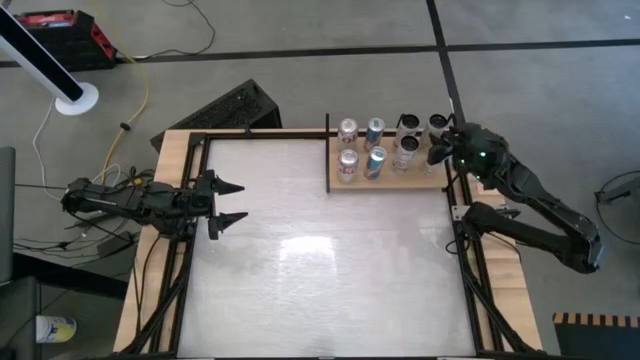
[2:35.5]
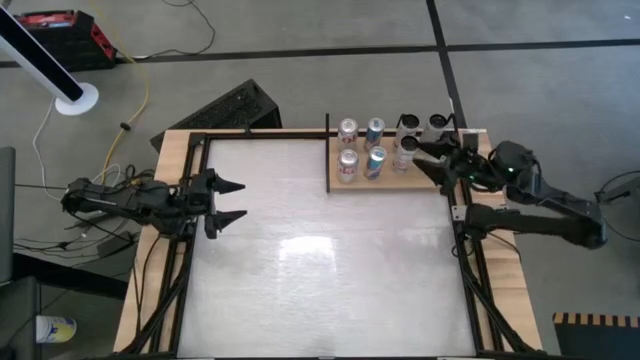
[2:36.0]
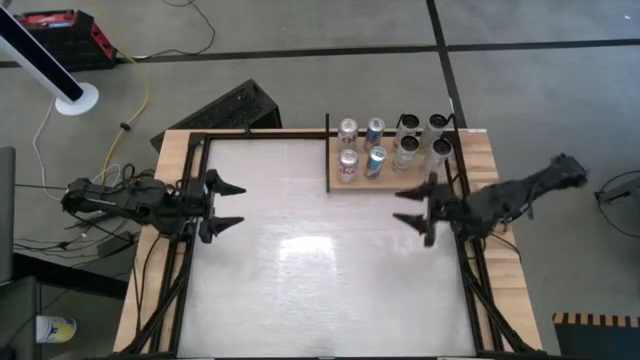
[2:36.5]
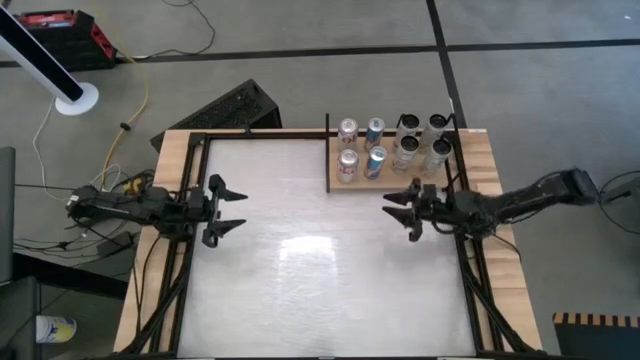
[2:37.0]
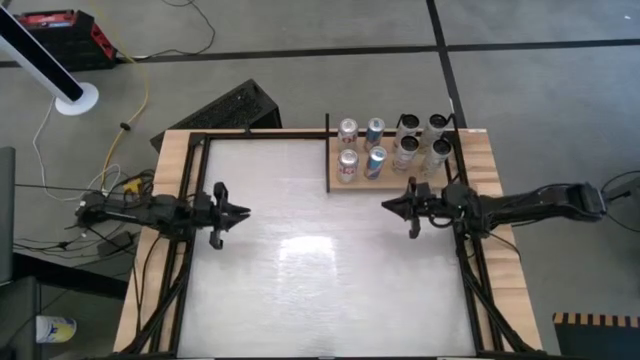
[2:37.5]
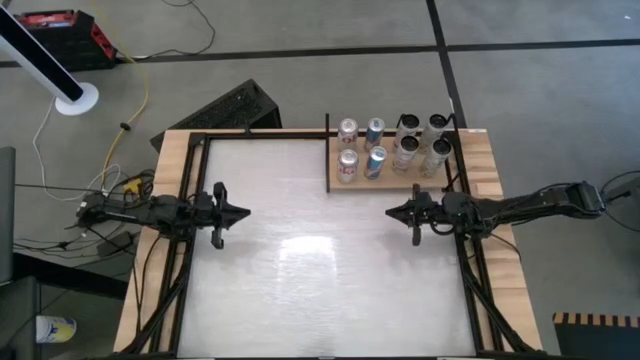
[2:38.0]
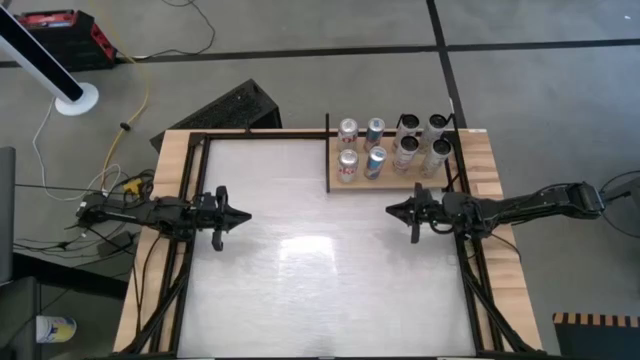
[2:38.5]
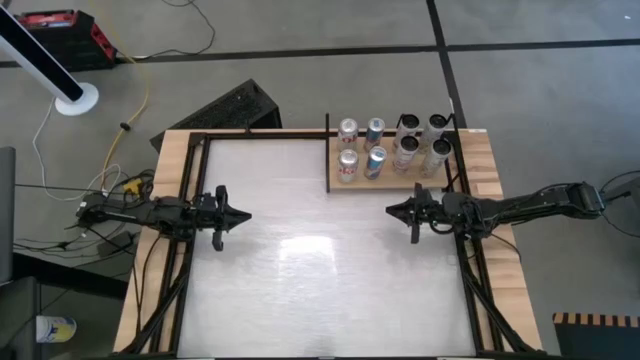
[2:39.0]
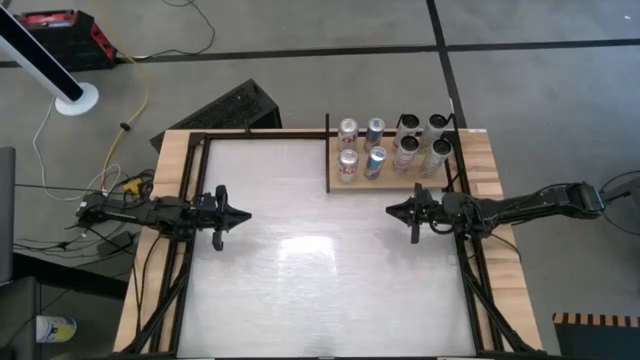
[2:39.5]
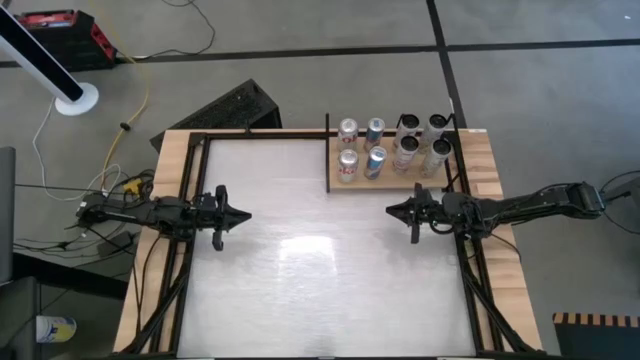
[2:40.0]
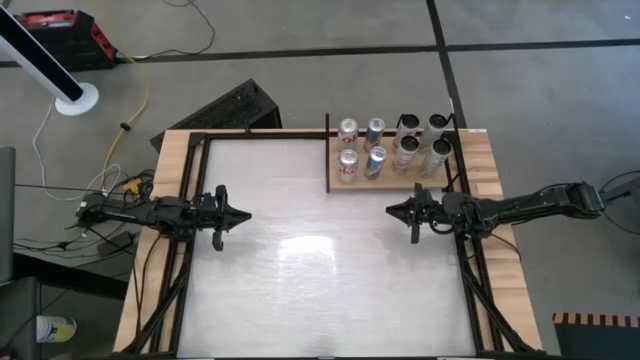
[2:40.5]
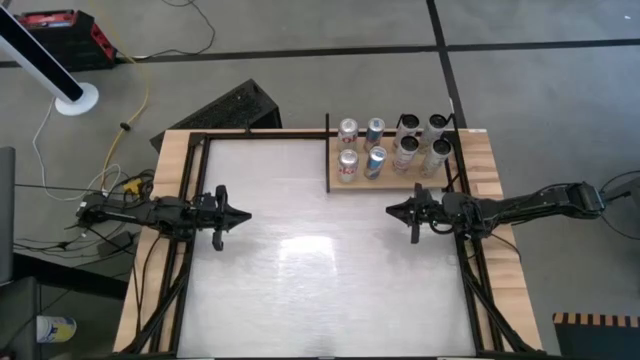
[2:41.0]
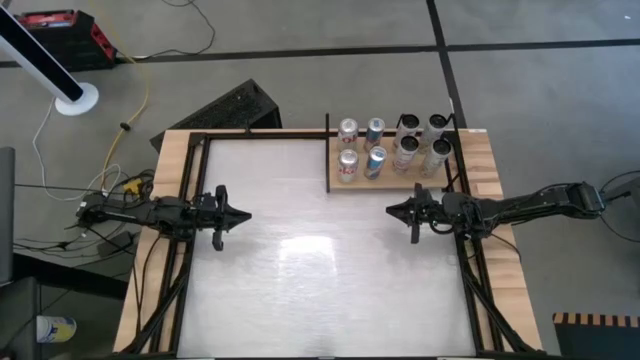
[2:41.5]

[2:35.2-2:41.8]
Task: Place canned beverage on shelf
Return to Home Position

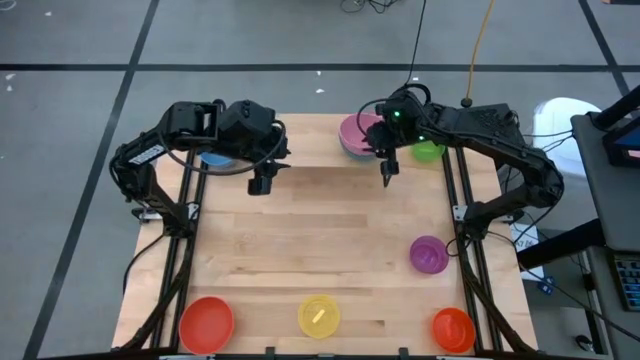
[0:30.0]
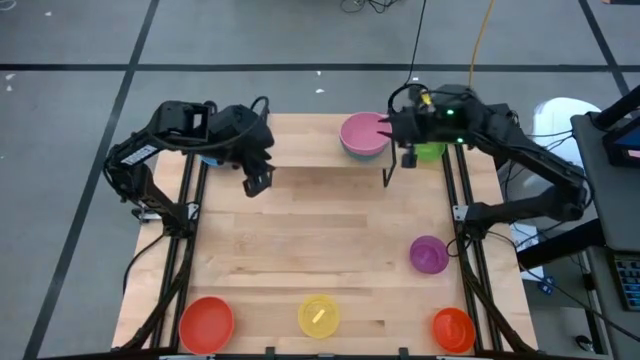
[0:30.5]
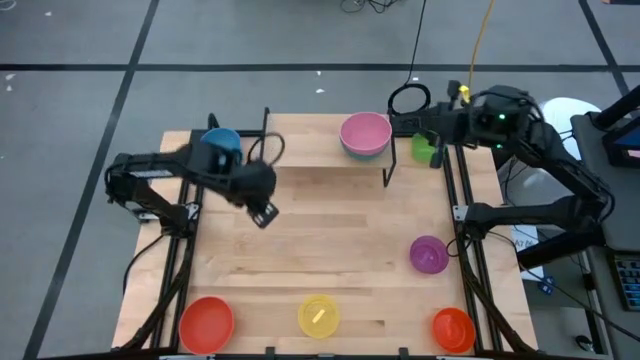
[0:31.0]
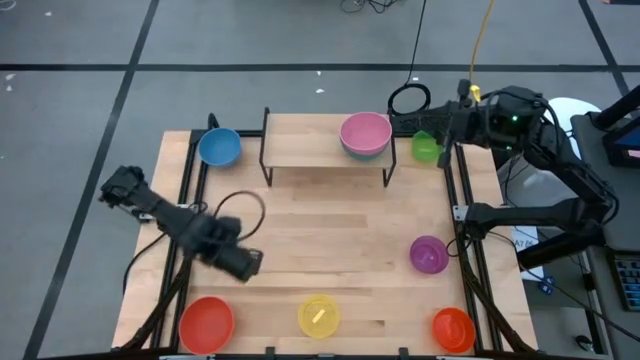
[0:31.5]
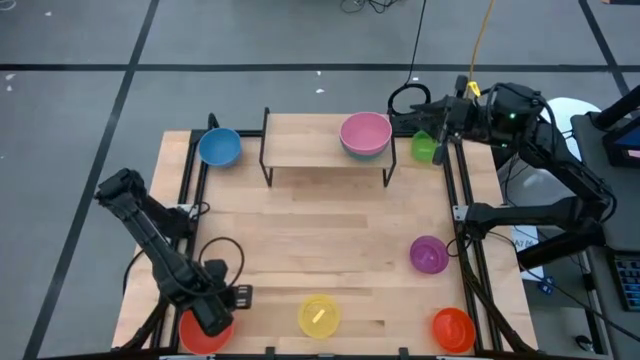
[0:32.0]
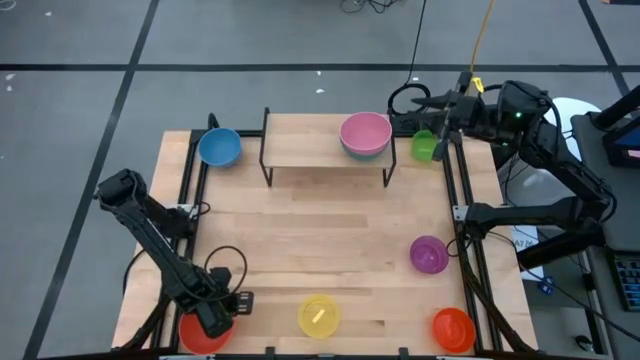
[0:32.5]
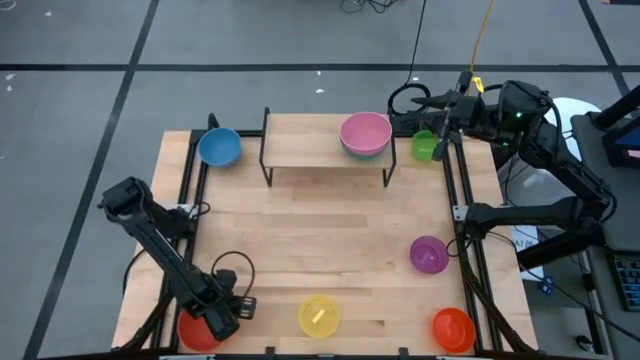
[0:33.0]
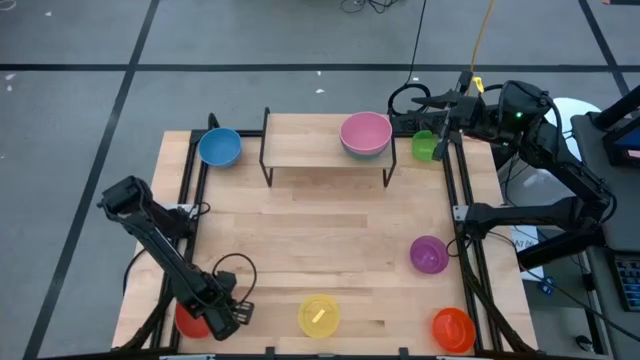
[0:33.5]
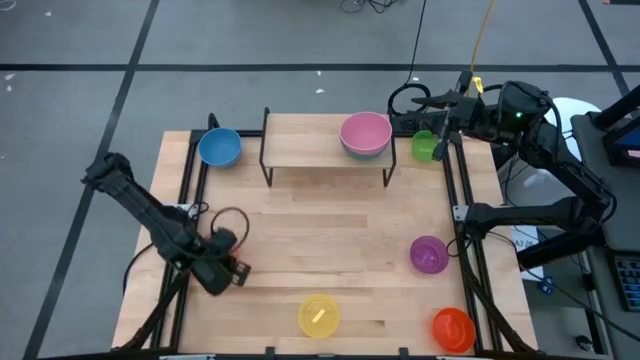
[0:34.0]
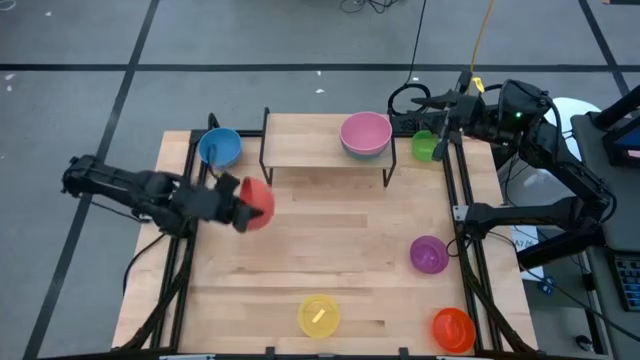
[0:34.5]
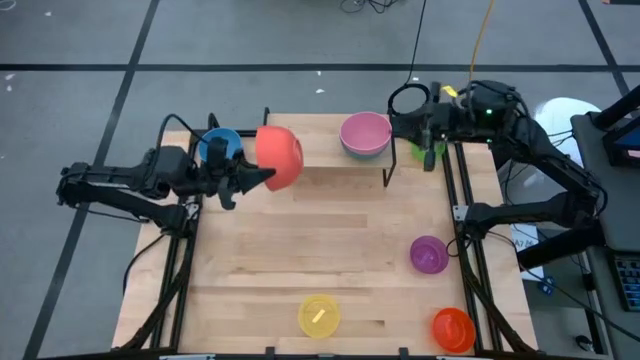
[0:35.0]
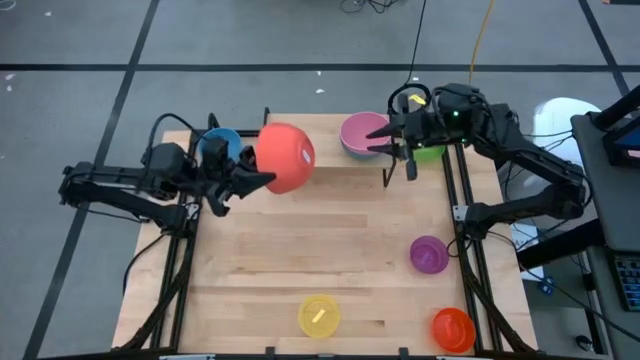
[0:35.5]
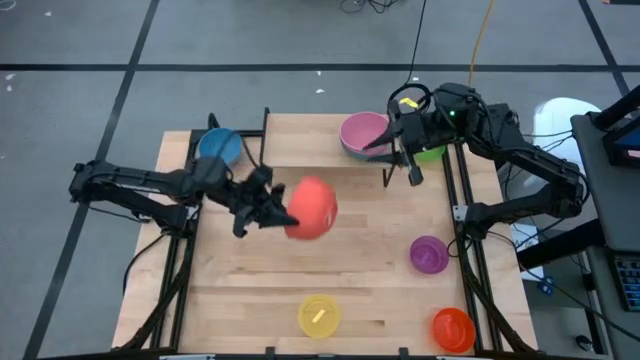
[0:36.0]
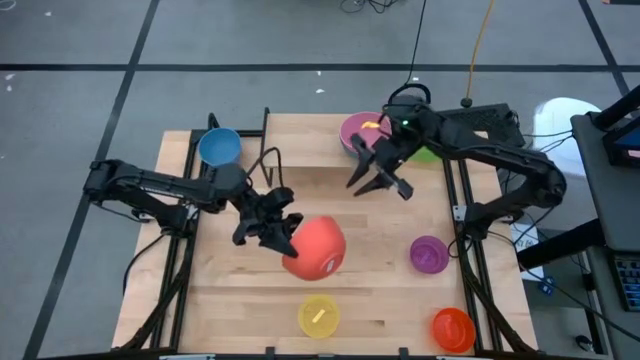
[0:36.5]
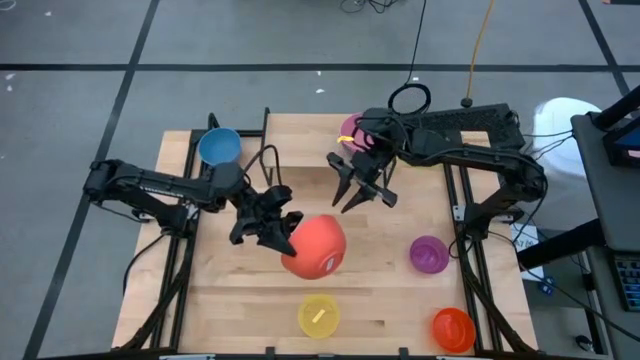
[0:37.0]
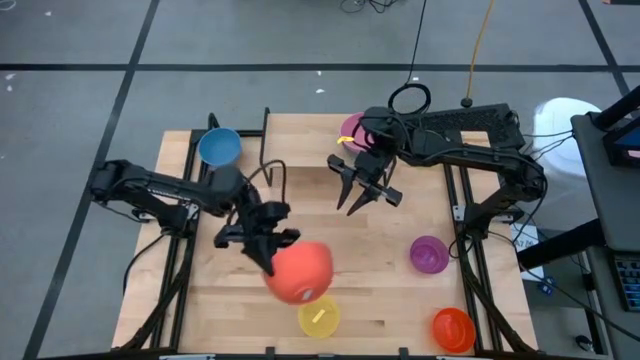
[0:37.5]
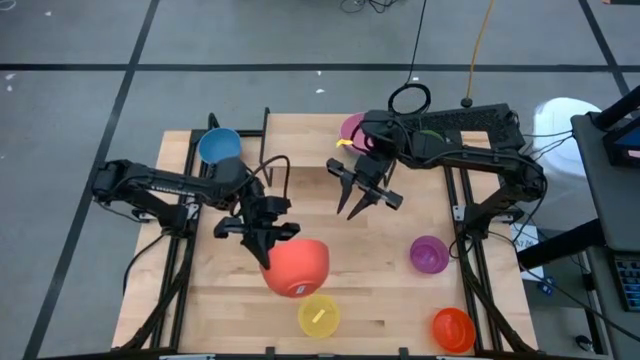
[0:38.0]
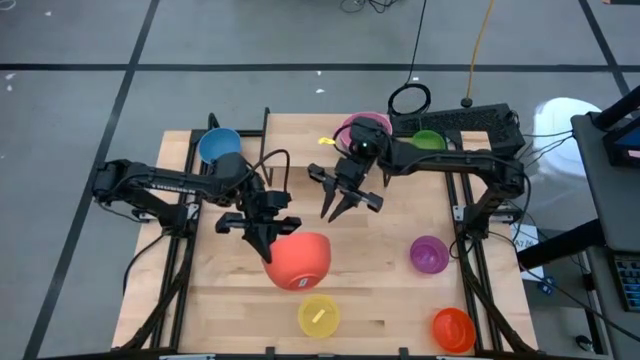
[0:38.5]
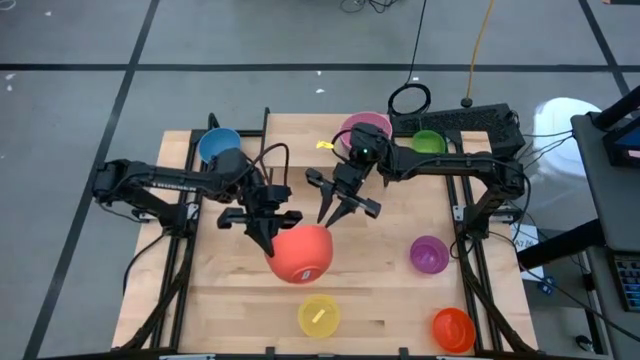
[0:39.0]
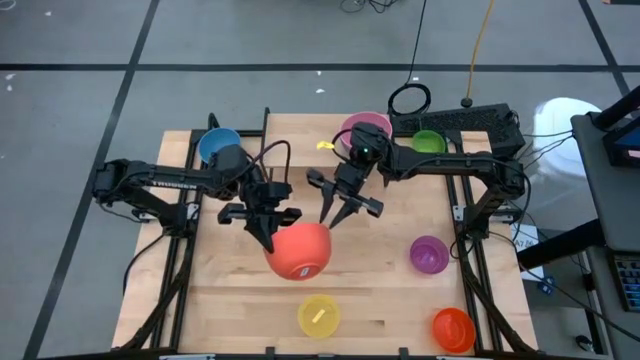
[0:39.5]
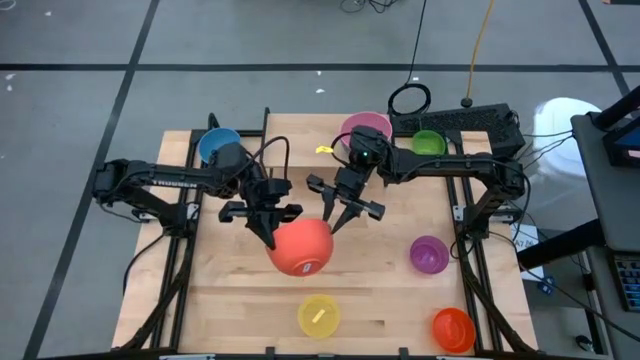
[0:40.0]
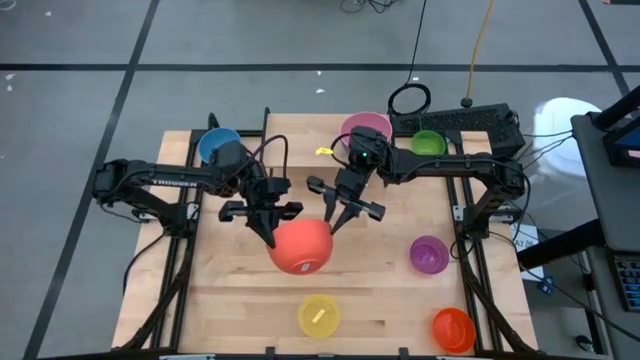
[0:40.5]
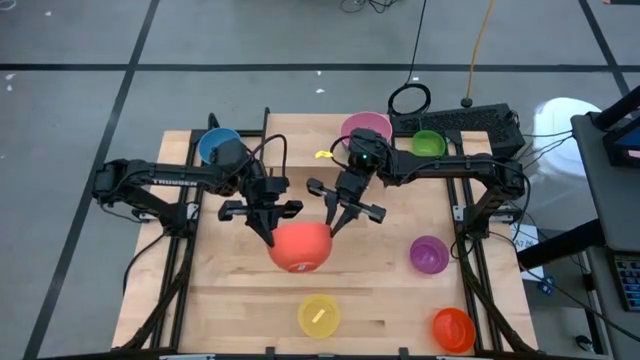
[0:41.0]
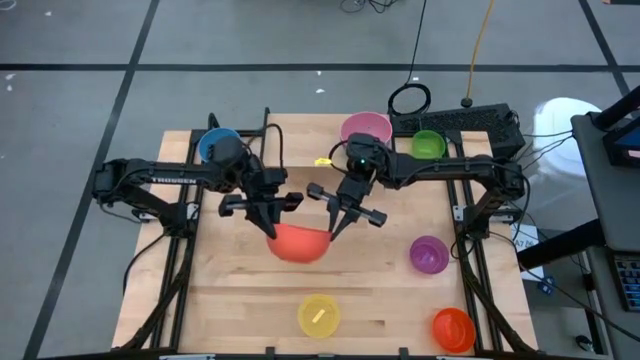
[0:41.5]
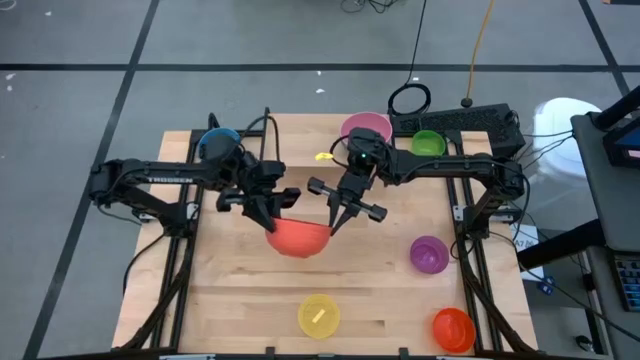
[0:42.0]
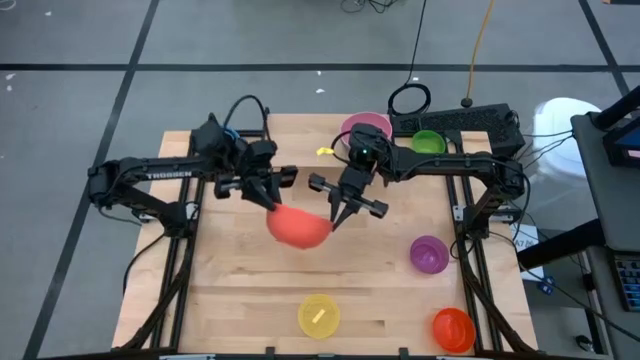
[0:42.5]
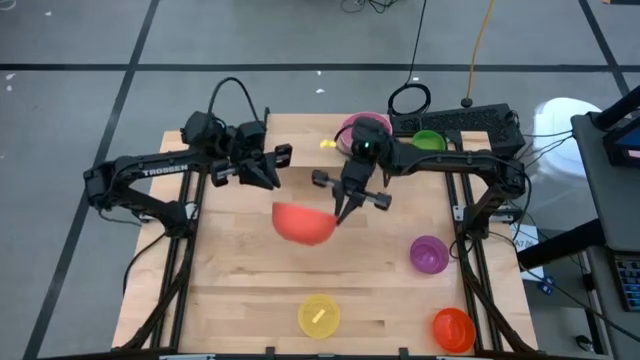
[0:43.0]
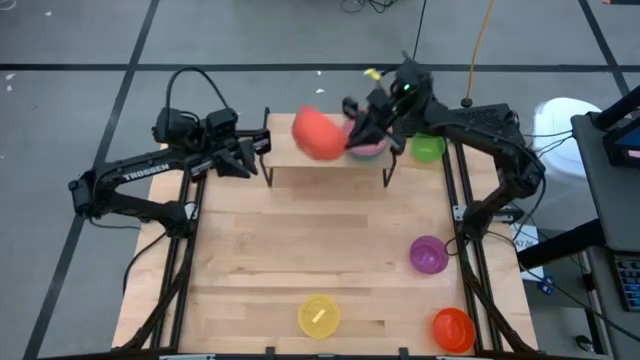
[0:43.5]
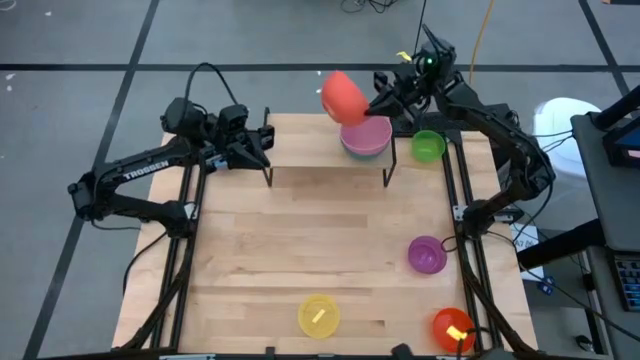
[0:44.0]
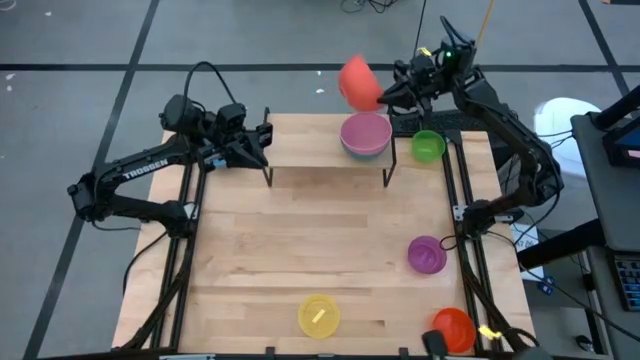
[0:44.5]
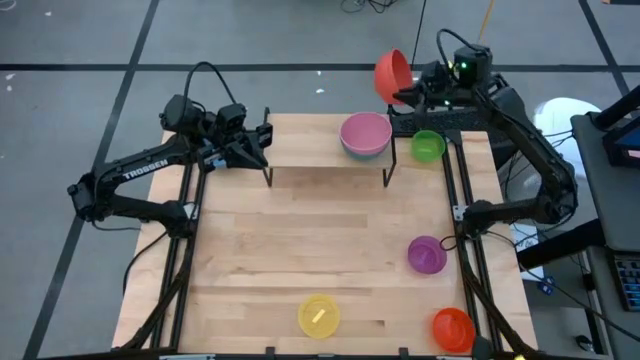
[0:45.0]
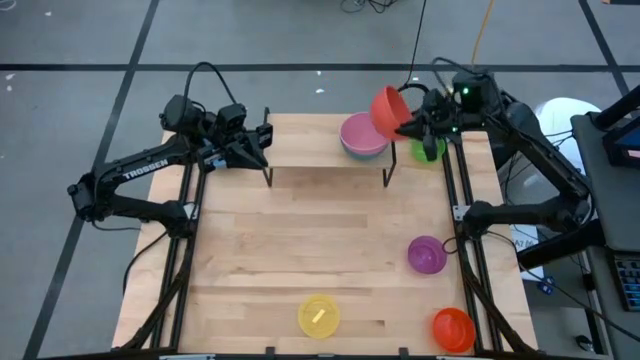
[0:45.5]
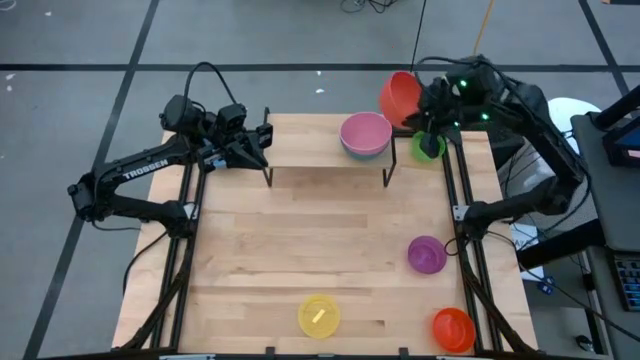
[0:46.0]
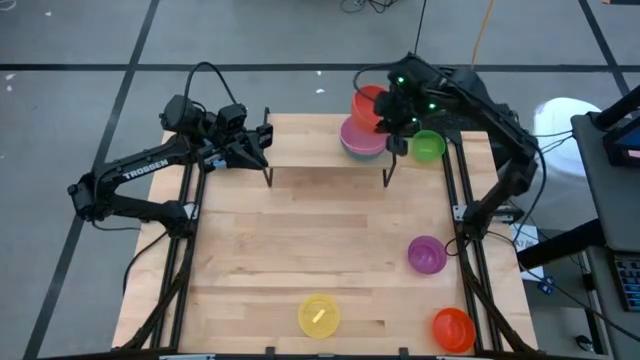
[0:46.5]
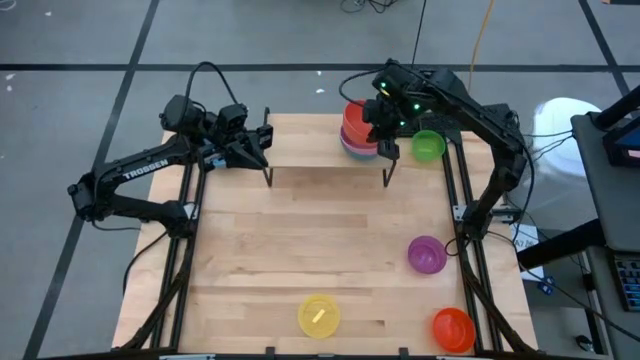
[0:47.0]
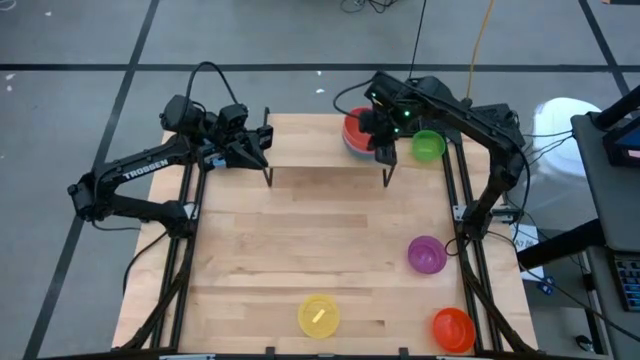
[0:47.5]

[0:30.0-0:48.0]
Task: Place and stack bowls onto a shelf
Stack the left orange bowl on top of the pink bowl on the shelf
